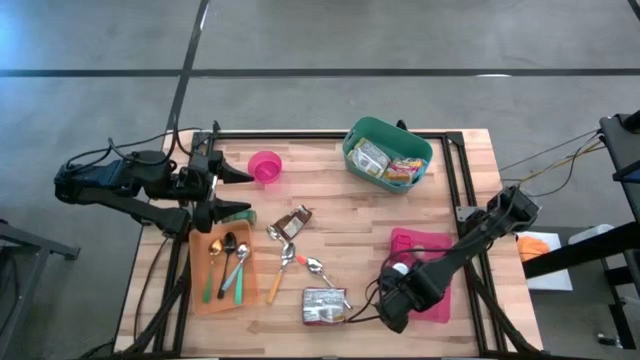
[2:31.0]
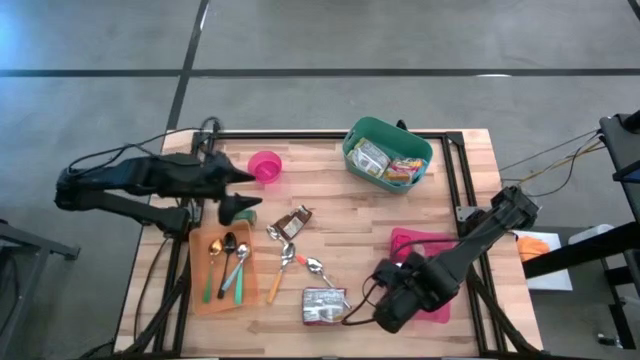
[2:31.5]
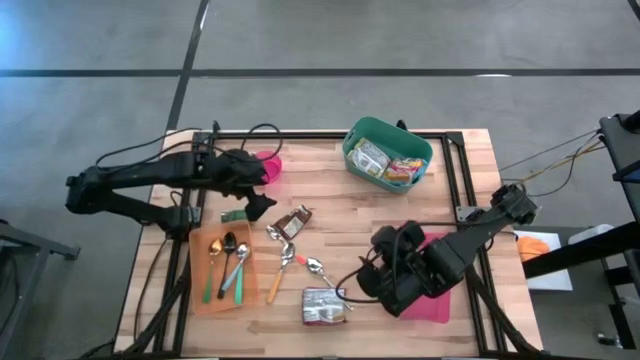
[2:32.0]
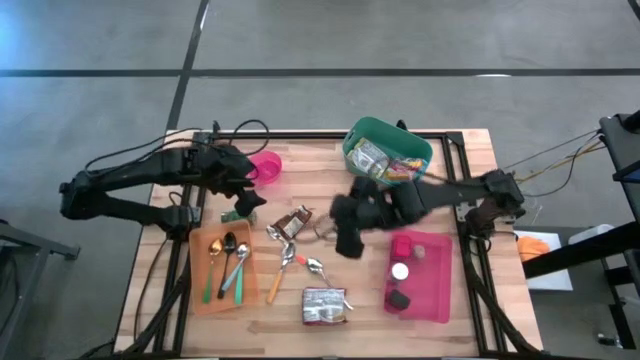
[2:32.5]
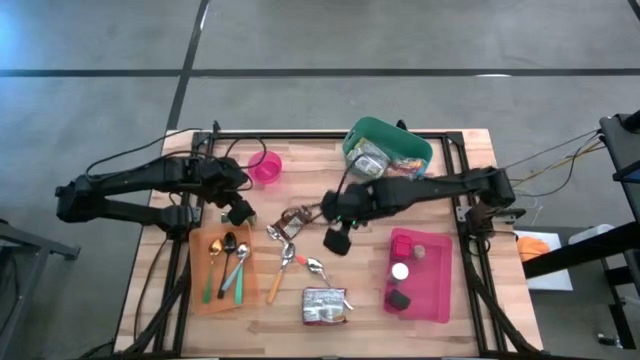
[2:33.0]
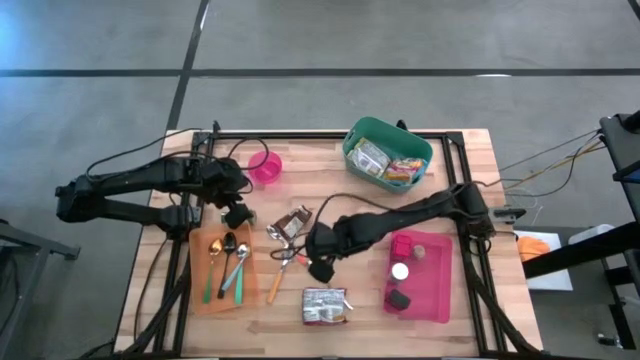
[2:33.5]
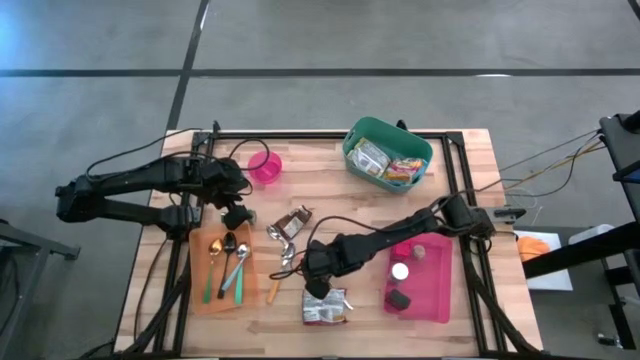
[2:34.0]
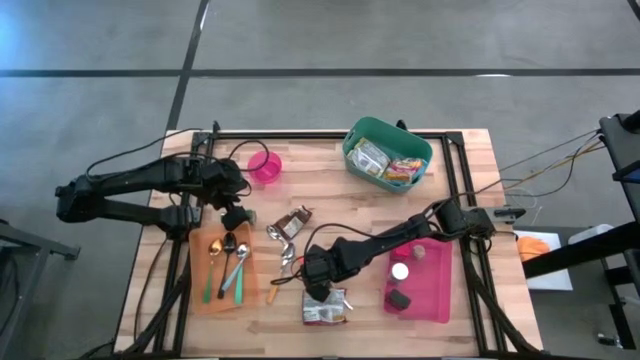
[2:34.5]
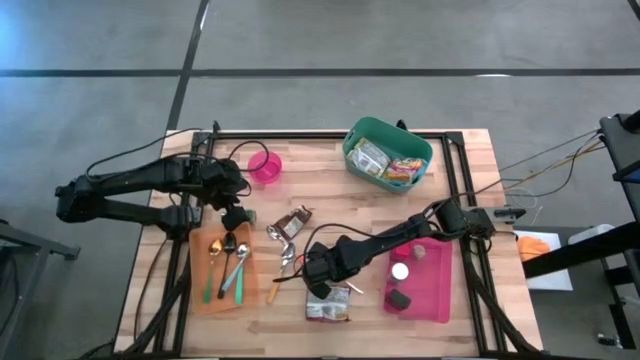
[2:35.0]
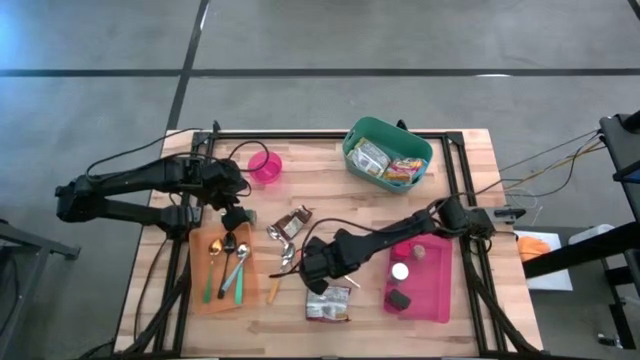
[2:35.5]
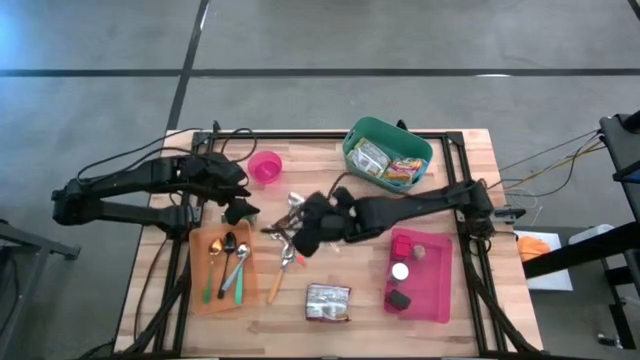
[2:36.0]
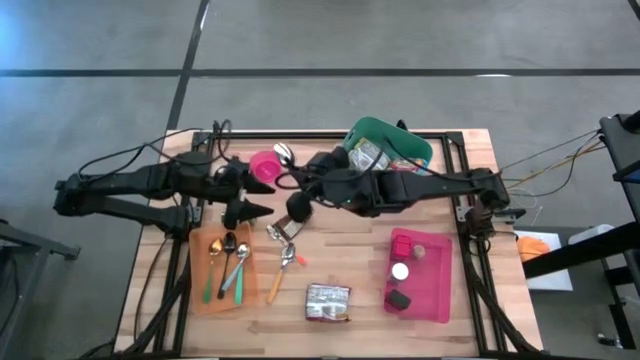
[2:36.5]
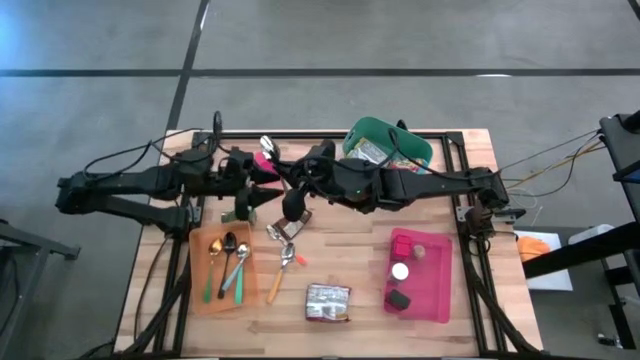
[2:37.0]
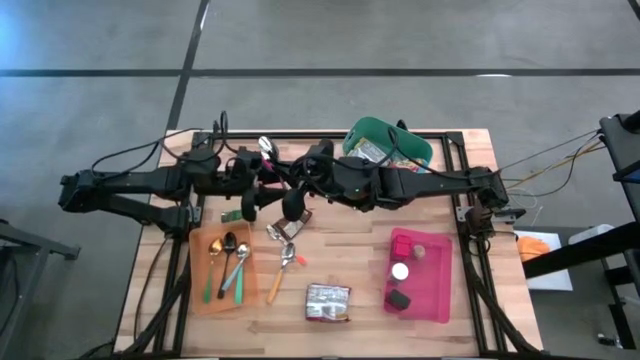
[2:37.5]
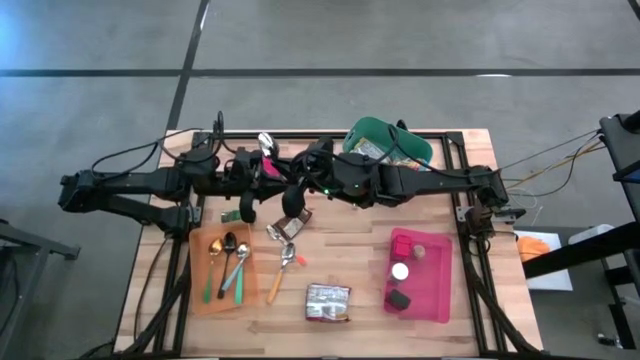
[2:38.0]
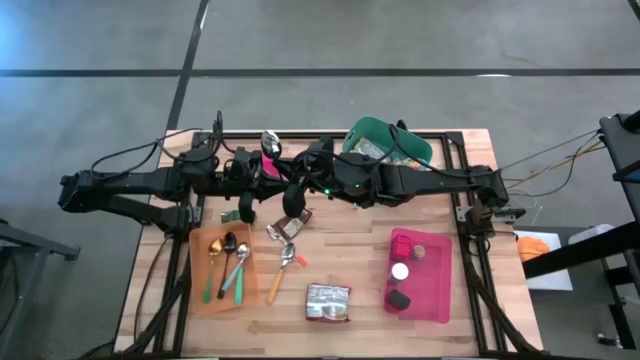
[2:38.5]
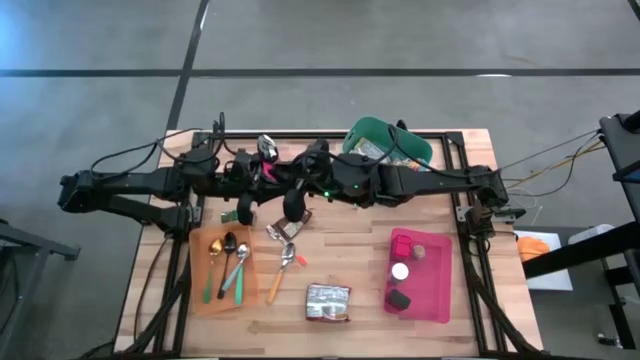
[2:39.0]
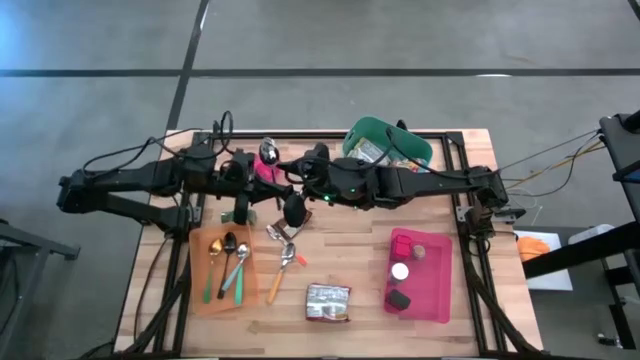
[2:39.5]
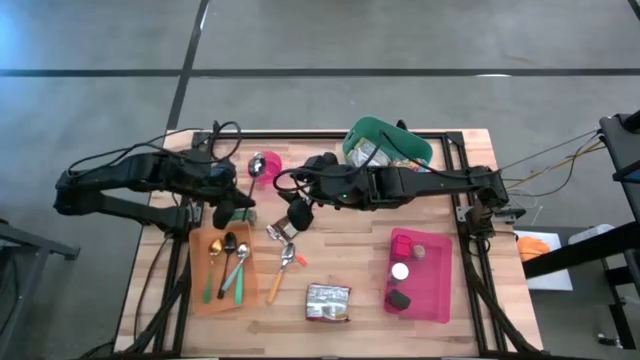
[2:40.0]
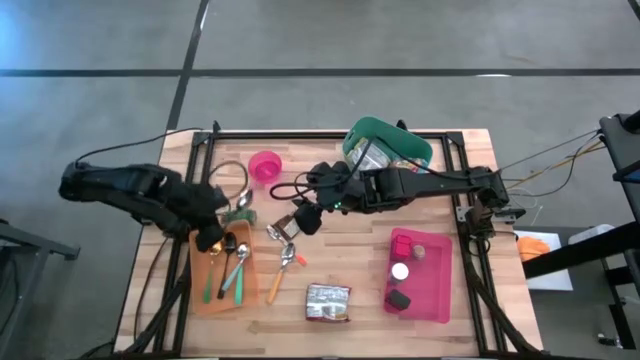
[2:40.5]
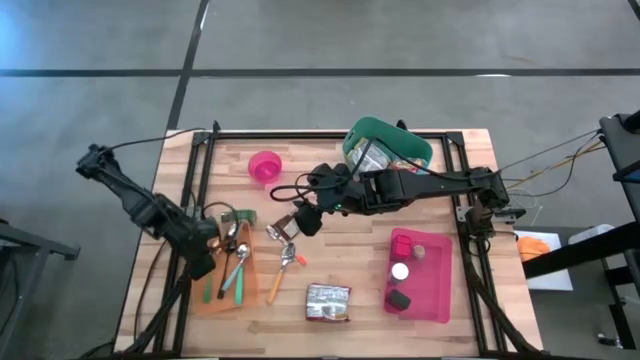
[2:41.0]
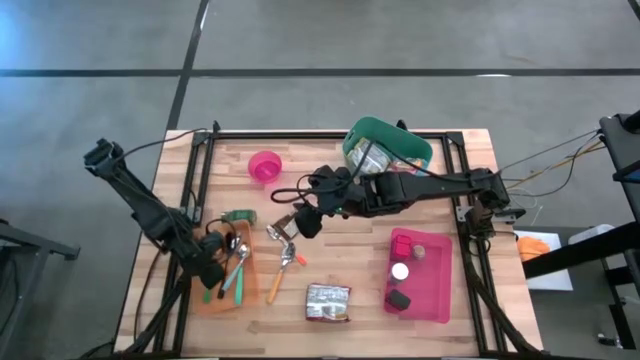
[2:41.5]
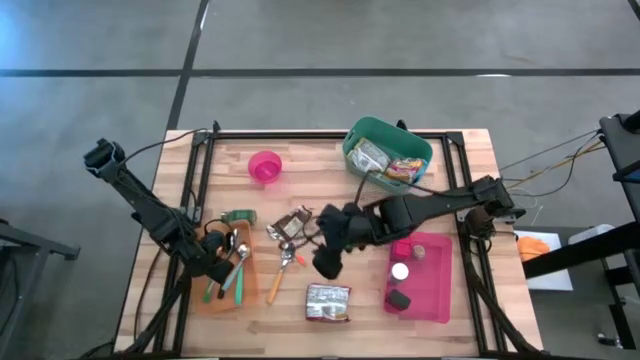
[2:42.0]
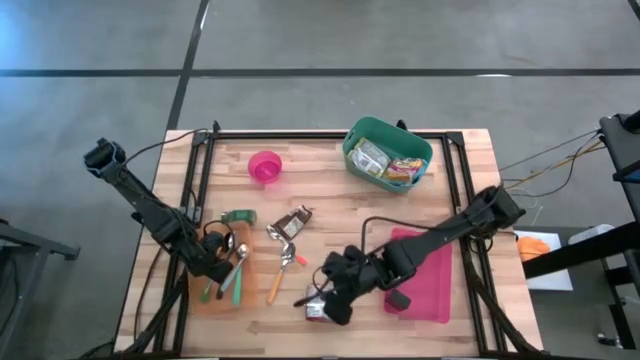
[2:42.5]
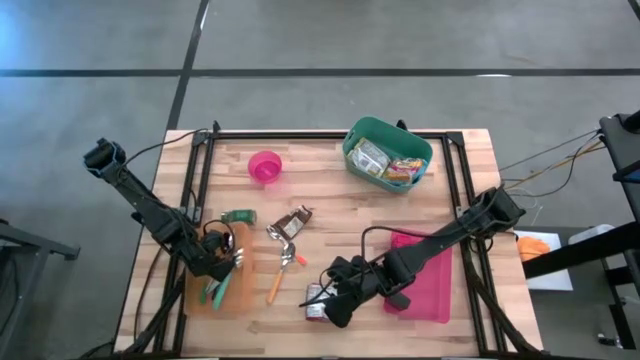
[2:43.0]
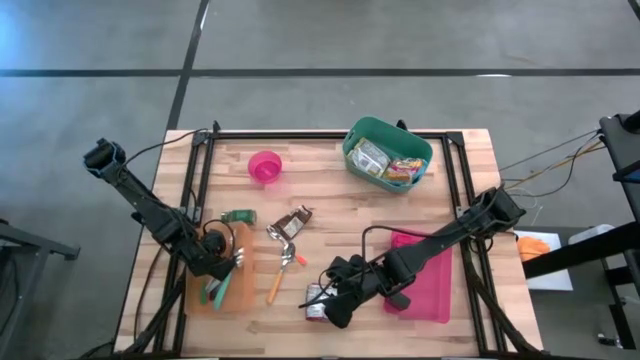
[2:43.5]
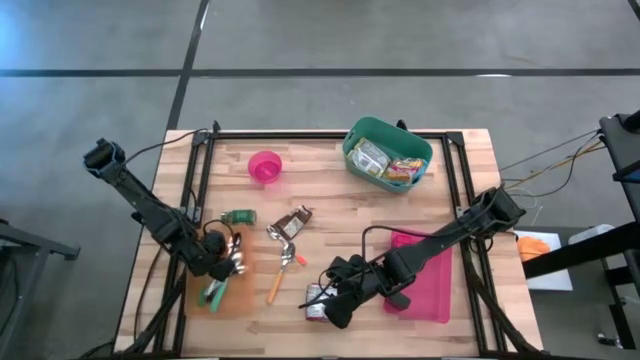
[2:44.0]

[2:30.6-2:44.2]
Task: Pick & Place Food Item
Put the silver spoon into the orange bin

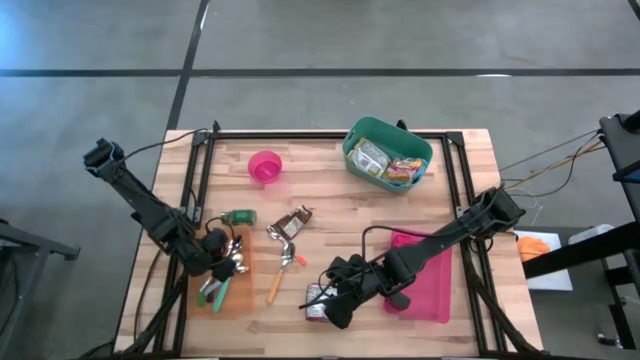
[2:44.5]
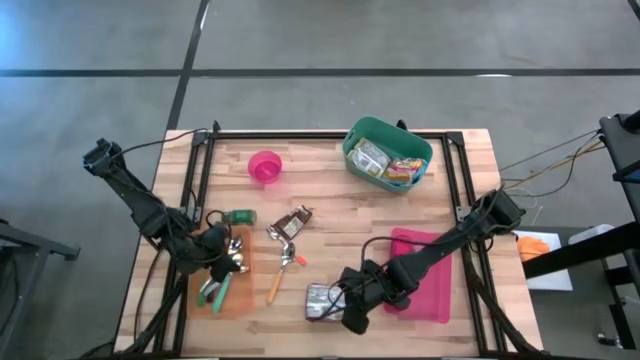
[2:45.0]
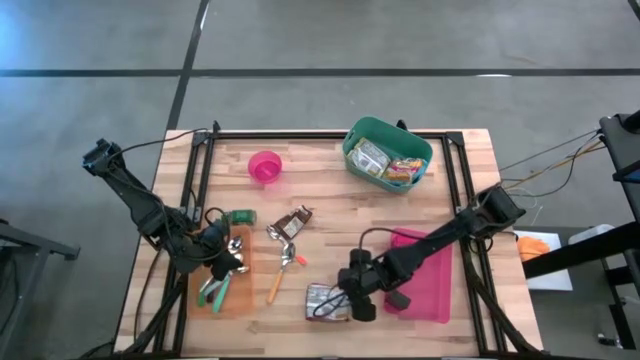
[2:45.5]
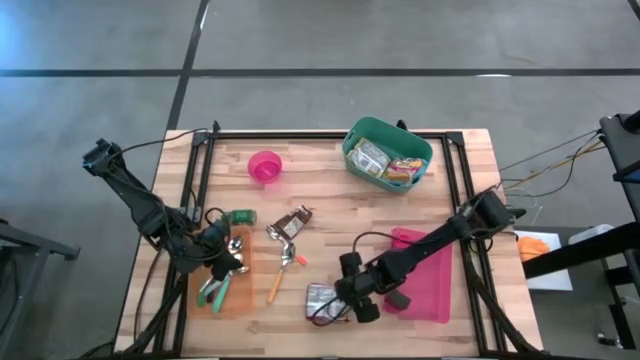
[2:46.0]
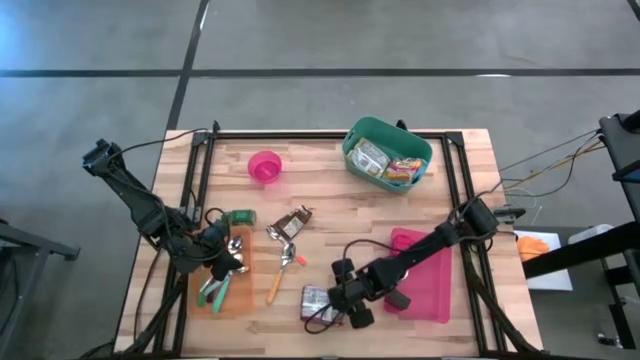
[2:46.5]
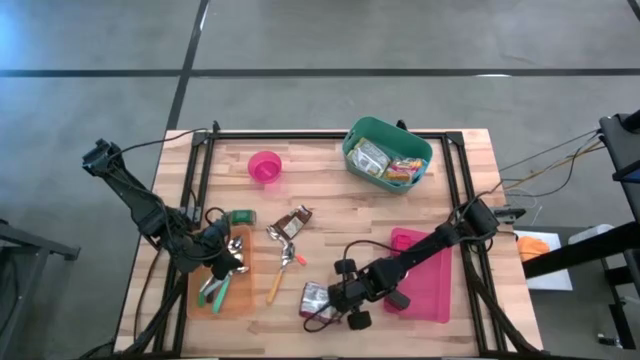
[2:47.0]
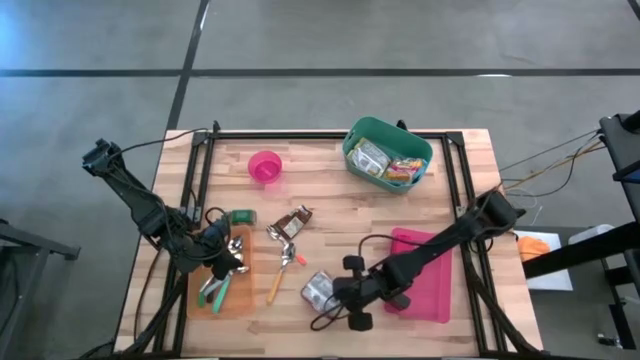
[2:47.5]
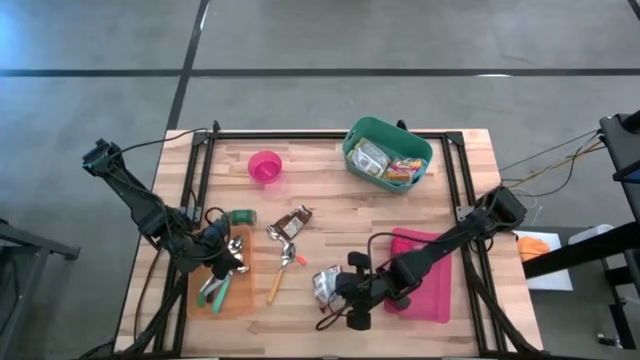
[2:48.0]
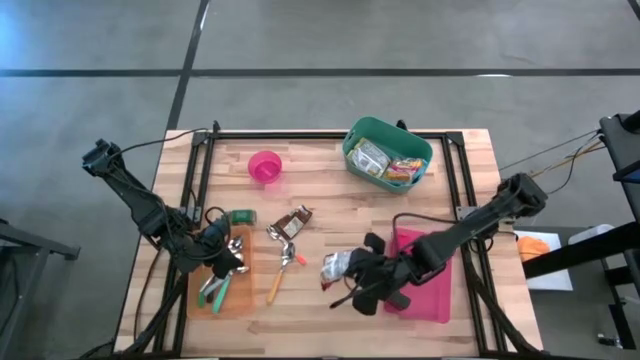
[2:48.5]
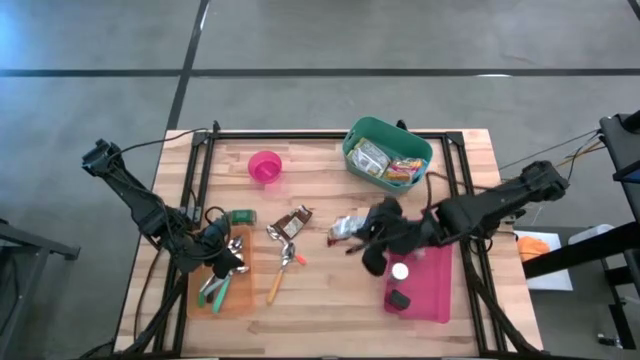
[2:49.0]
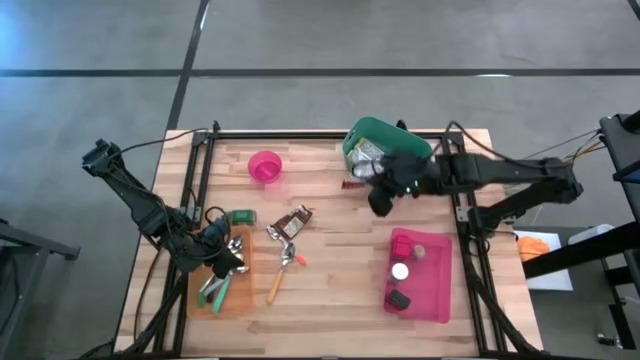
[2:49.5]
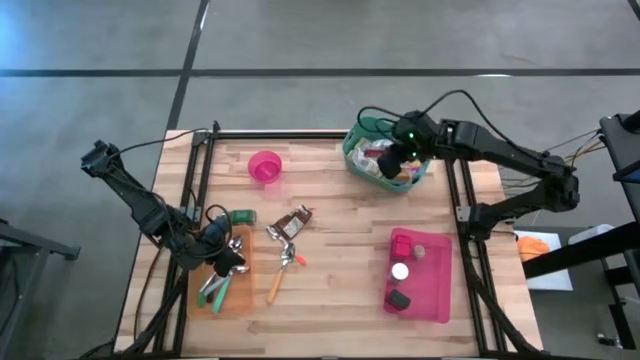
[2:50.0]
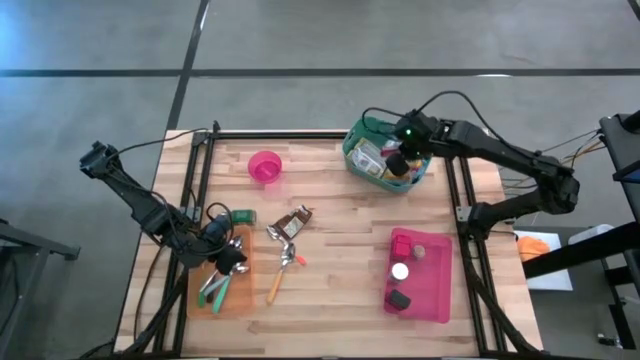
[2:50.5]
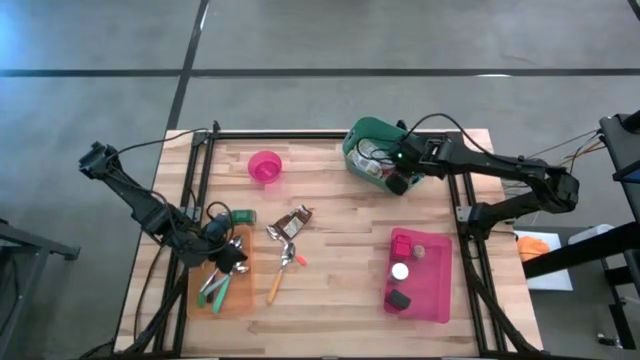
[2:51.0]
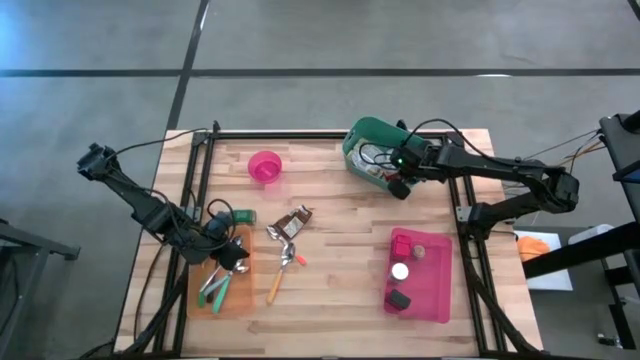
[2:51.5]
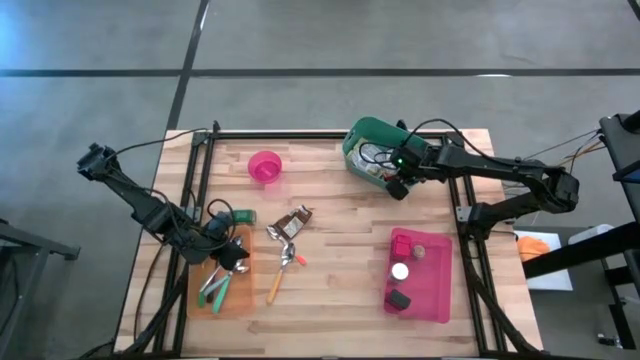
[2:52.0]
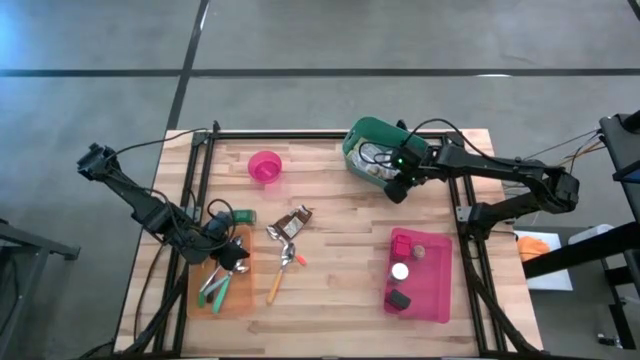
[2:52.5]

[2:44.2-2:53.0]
Put the red noodle pack into the green bin
